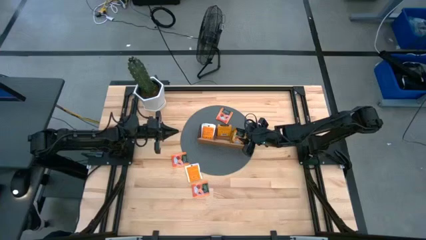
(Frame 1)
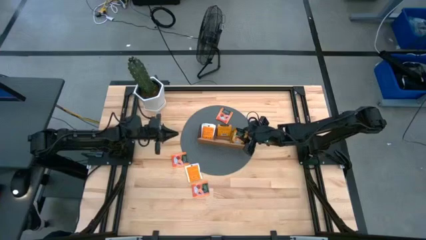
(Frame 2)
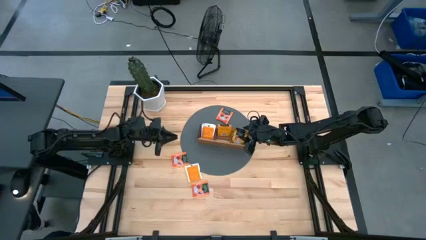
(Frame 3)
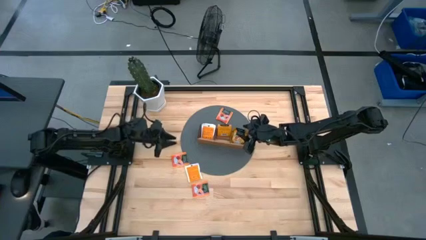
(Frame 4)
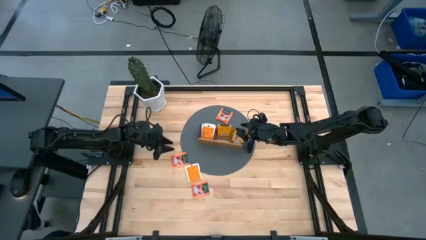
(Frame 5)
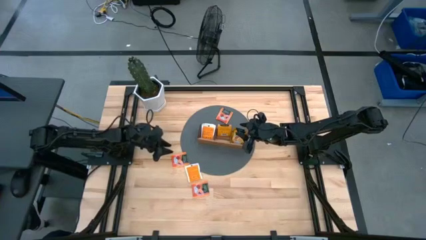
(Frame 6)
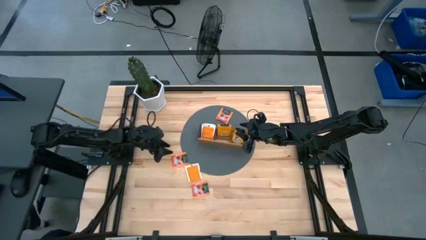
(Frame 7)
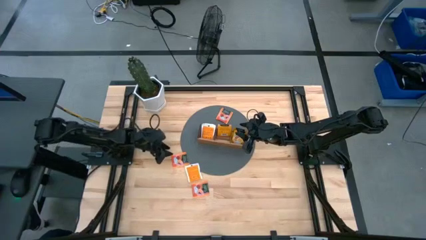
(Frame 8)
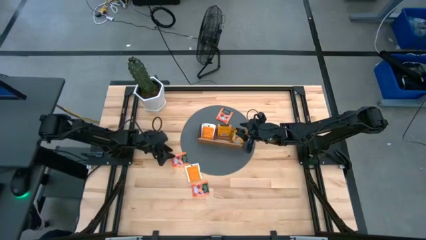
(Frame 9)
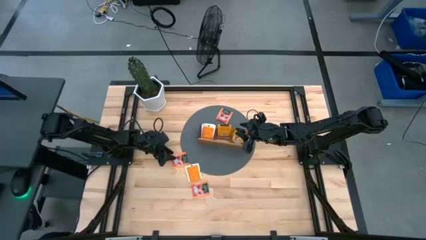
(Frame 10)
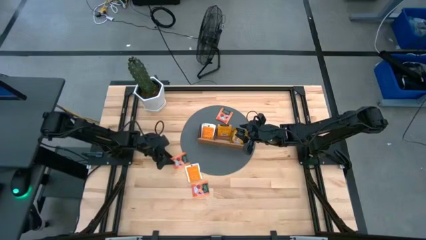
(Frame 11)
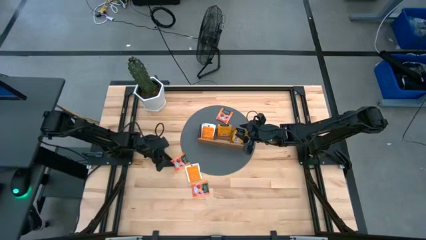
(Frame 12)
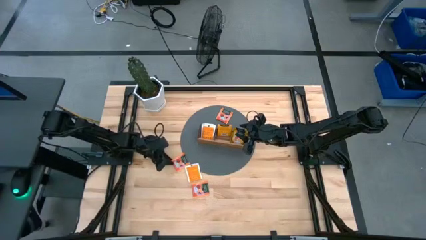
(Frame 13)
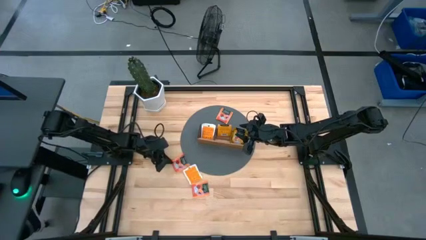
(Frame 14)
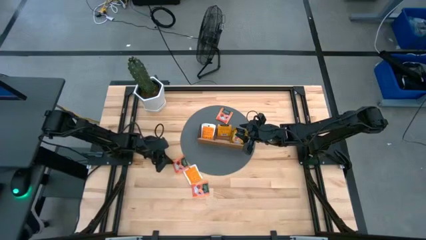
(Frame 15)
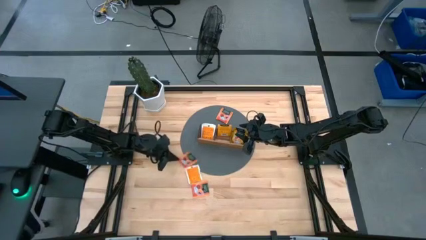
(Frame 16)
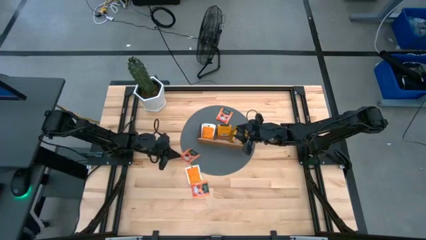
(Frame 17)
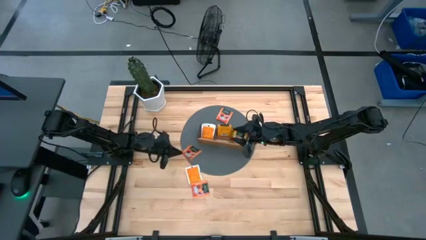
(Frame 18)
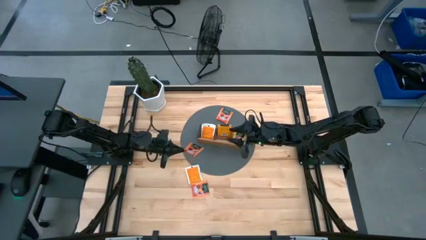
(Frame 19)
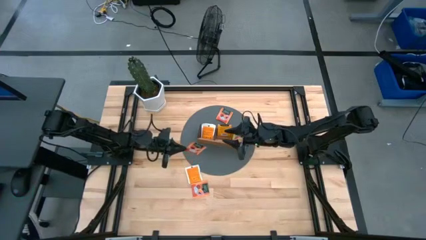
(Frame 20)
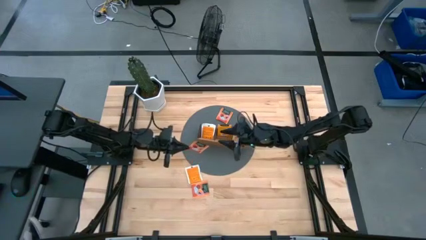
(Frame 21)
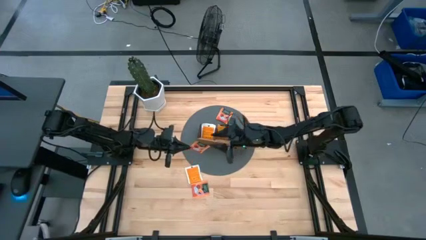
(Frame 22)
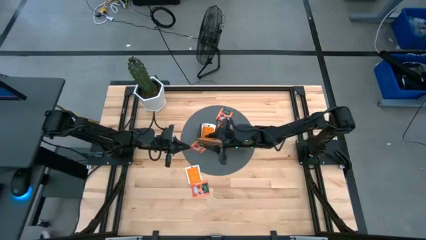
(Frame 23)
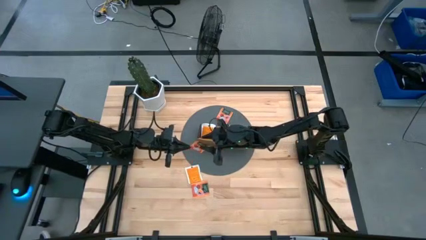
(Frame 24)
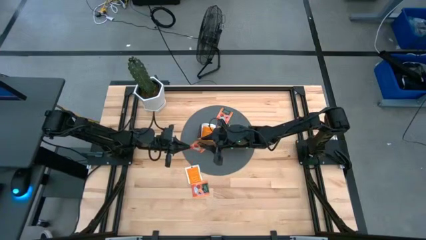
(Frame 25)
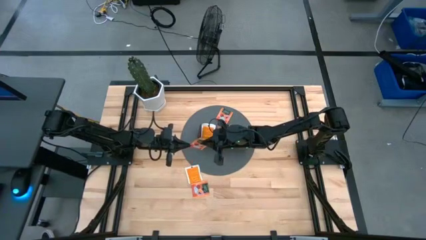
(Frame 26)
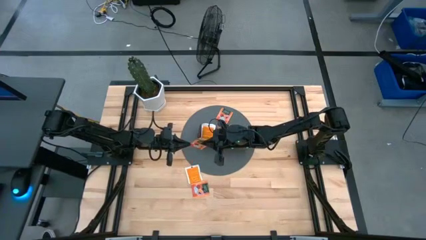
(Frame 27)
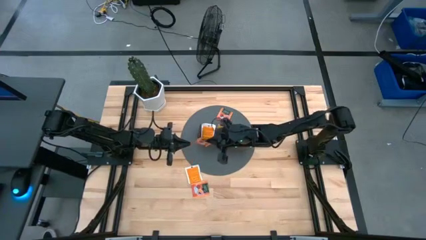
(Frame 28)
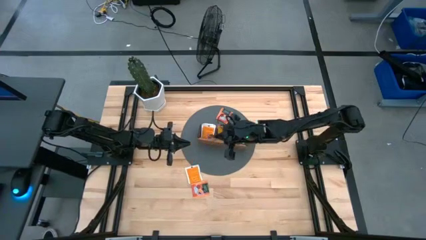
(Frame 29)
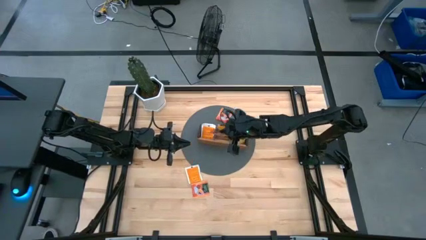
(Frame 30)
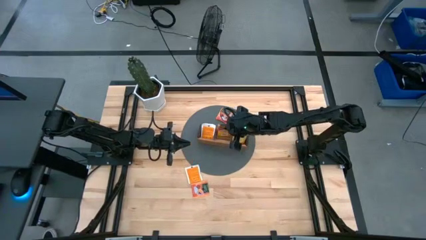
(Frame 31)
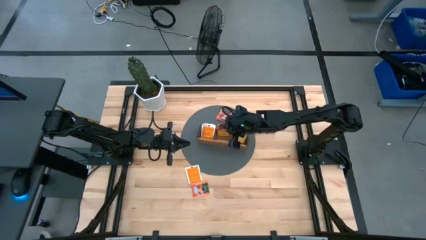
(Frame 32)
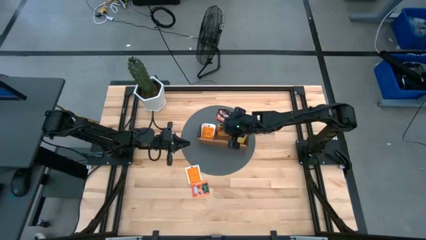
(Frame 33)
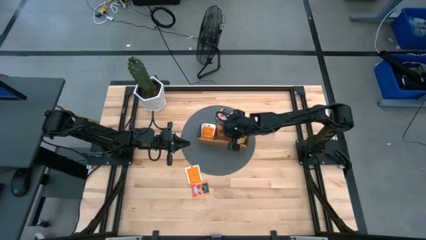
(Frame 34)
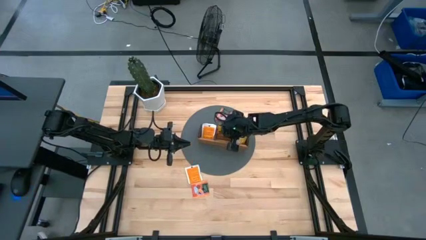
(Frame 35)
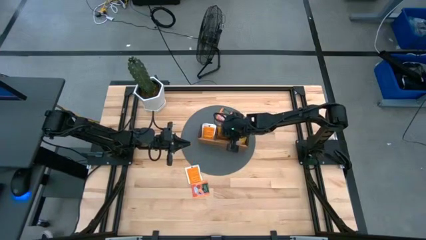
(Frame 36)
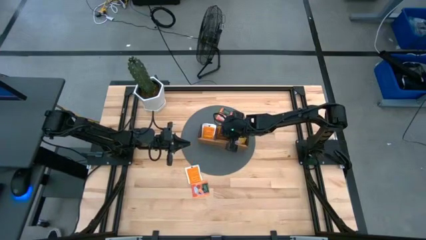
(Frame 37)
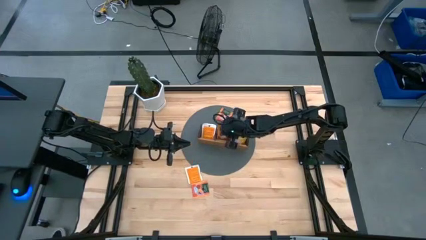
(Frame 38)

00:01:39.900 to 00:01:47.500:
Task: Pick & Place Tea
Put the orange tea bag into the middle section of the wooden organizer

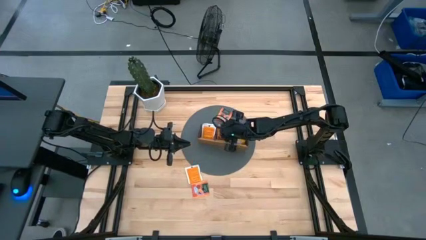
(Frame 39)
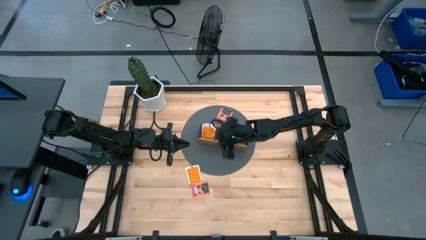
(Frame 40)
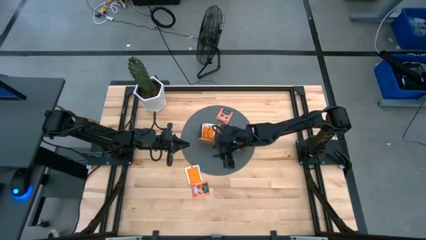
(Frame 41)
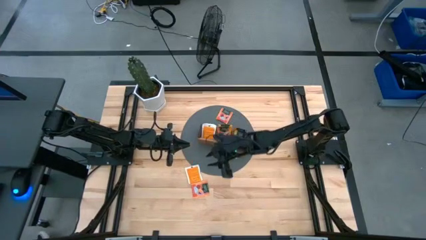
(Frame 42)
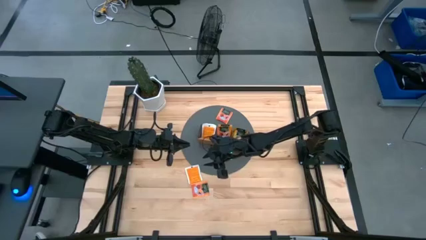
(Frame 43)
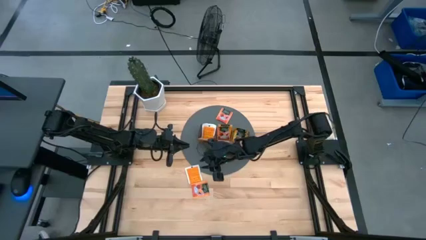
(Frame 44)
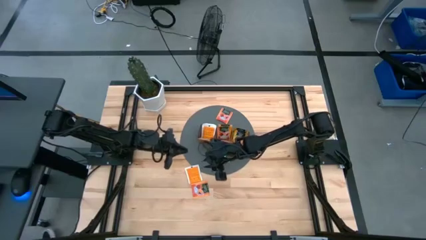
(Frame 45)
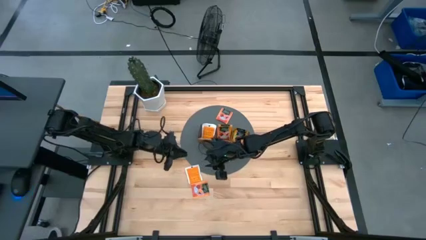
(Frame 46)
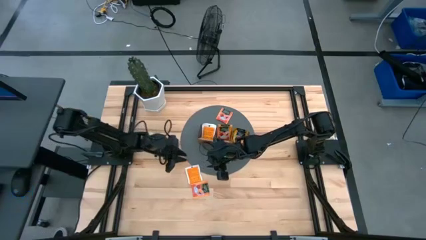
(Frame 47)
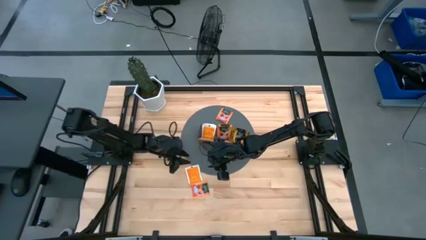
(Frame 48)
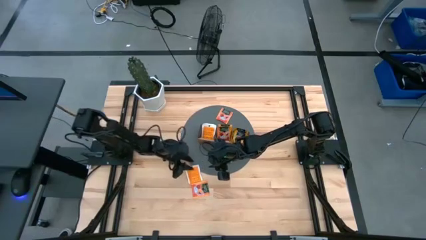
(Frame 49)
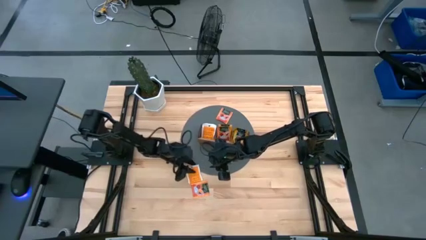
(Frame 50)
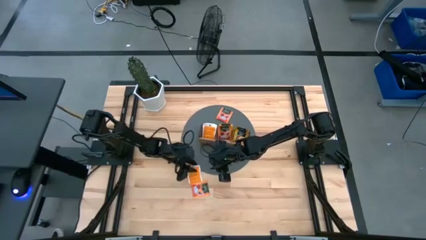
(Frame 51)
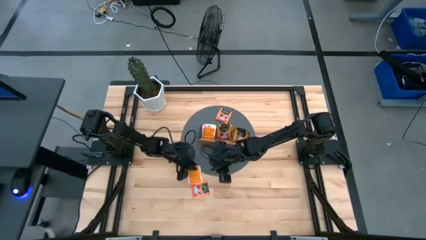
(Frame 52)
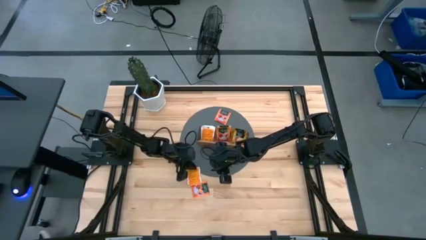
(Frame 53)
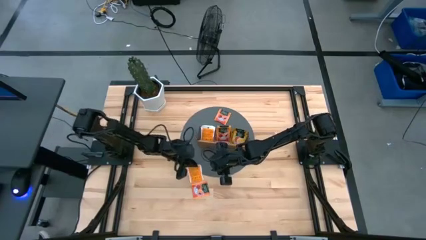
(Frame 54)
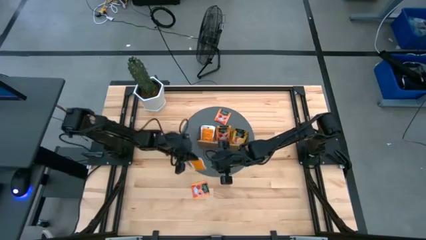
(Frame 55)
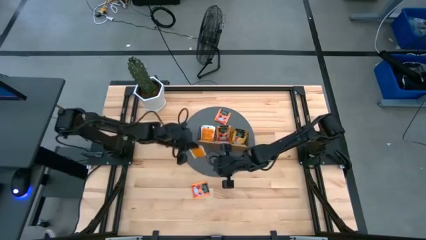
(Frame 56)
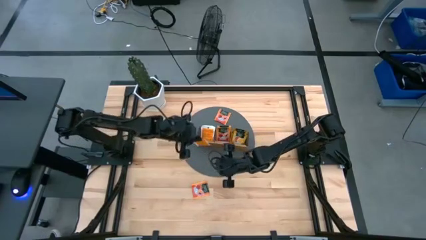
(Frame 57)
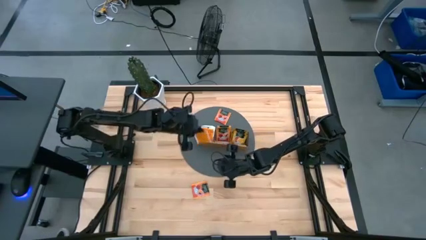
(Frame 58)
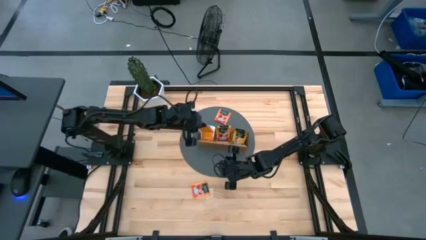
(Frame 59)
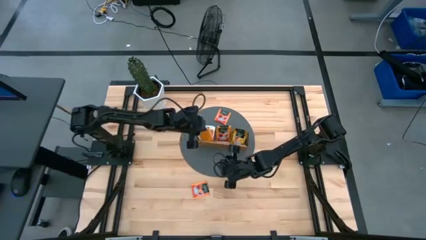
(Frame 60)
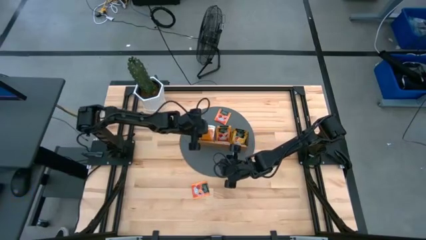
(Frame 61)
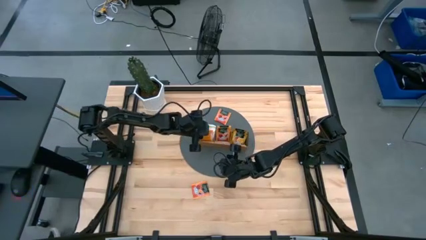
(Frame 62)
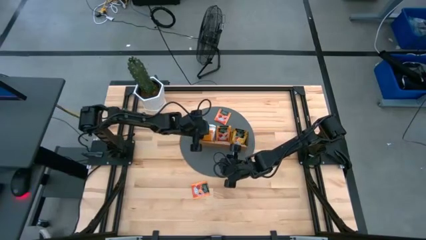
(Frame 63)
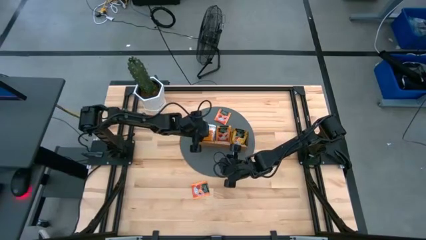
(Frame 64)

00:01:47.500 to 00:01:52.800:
Put the white tea bag into the left section of the wooden organizer
